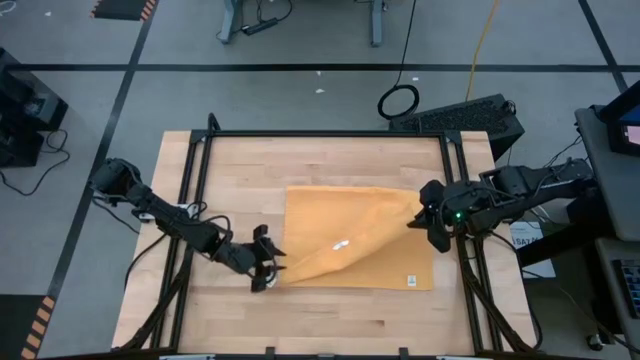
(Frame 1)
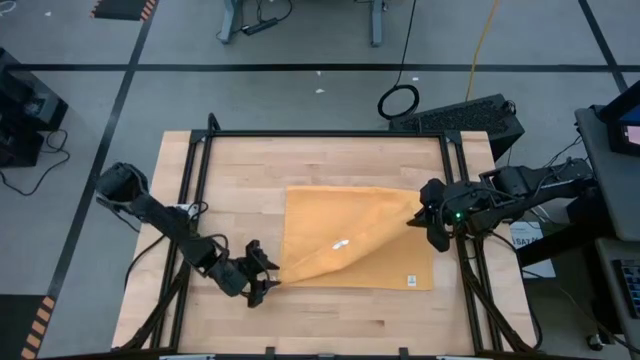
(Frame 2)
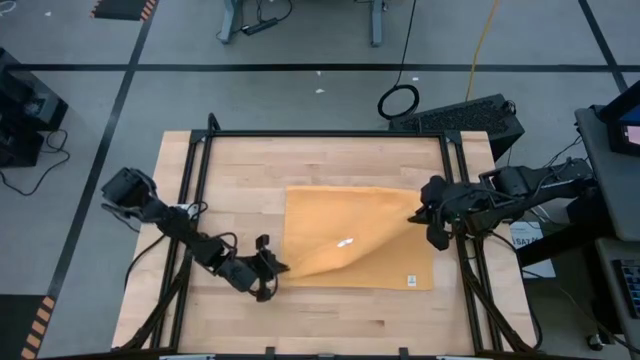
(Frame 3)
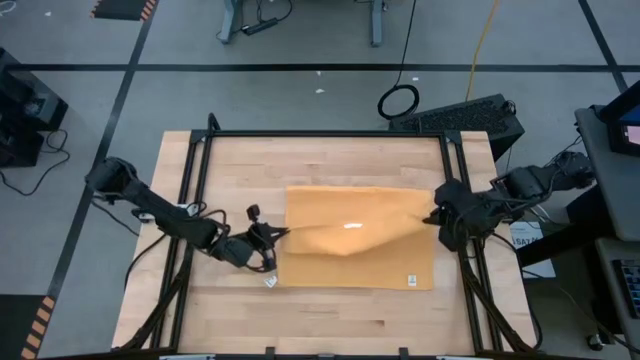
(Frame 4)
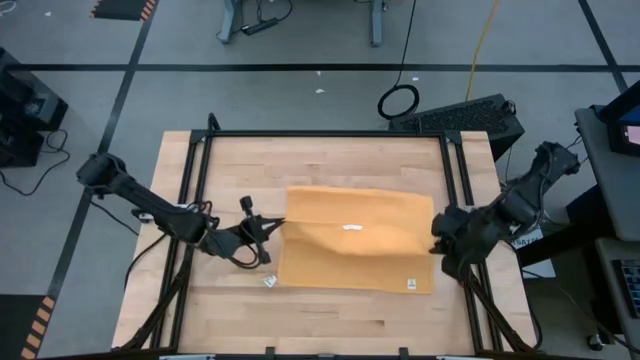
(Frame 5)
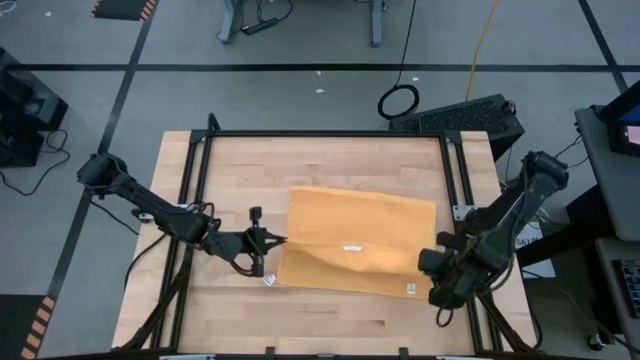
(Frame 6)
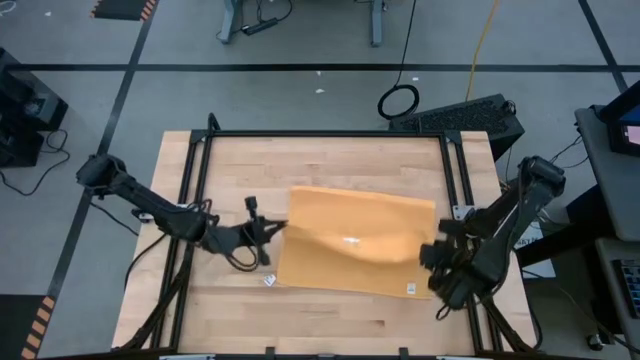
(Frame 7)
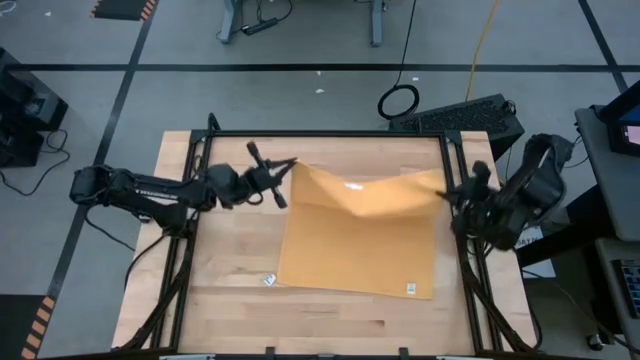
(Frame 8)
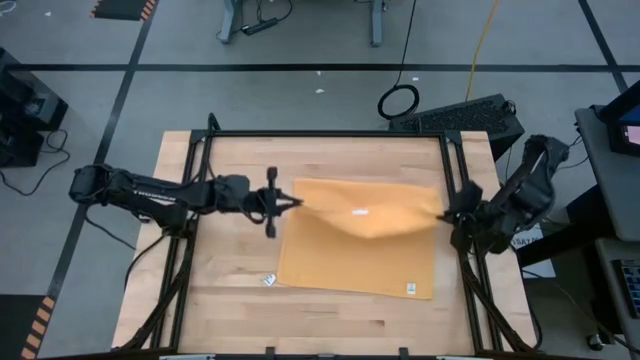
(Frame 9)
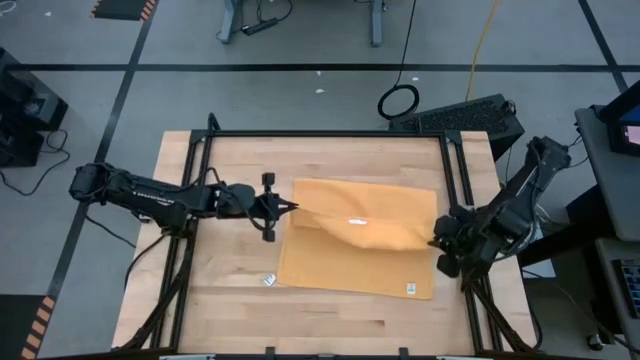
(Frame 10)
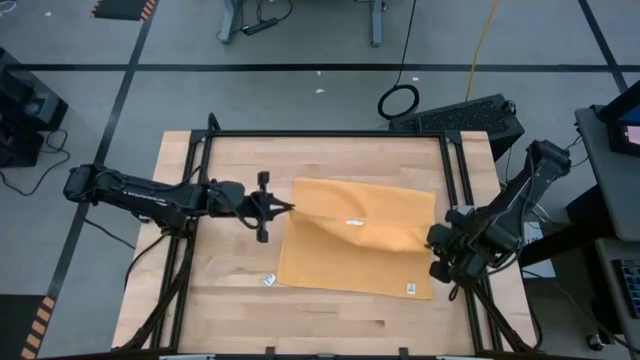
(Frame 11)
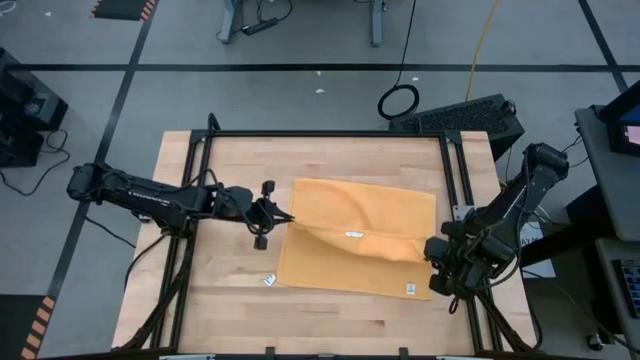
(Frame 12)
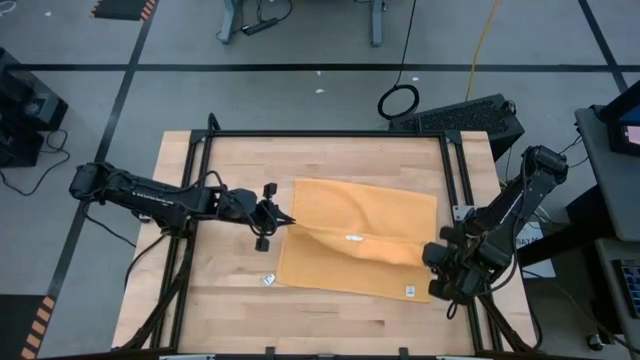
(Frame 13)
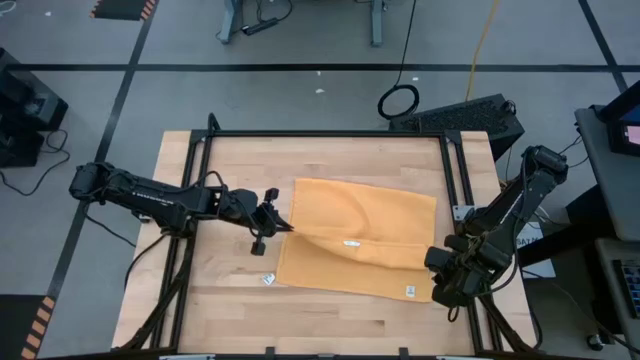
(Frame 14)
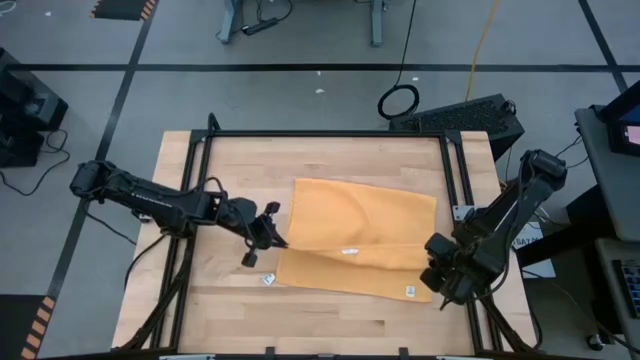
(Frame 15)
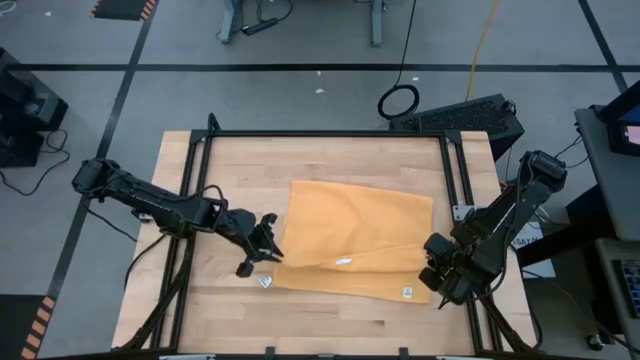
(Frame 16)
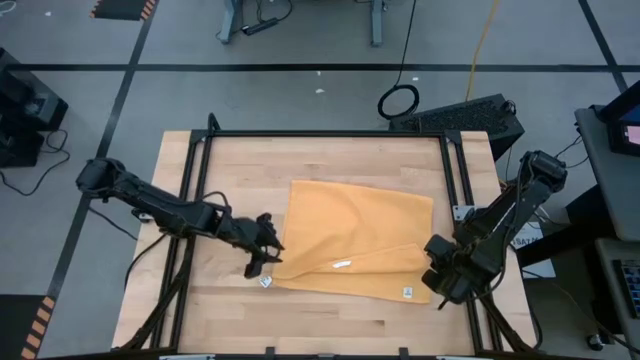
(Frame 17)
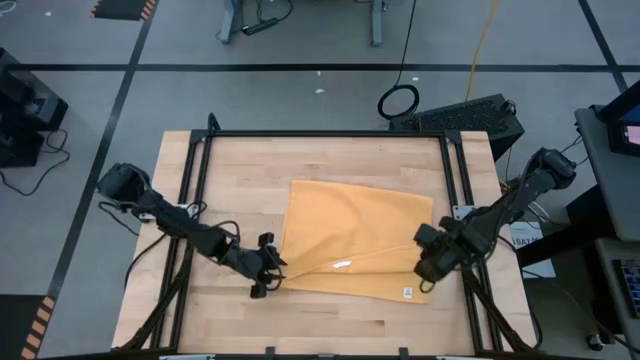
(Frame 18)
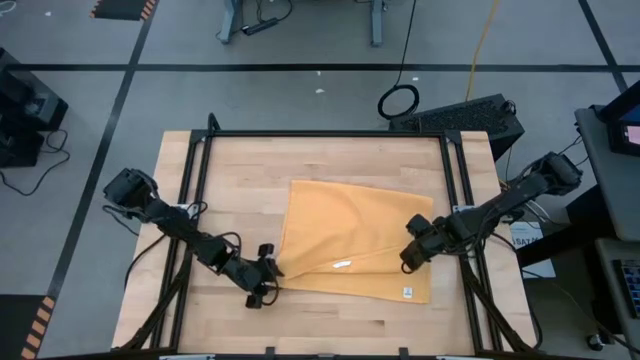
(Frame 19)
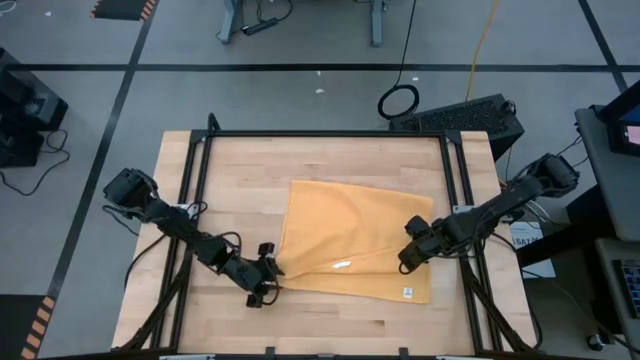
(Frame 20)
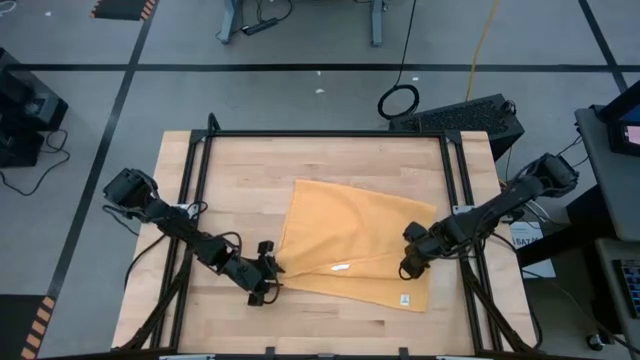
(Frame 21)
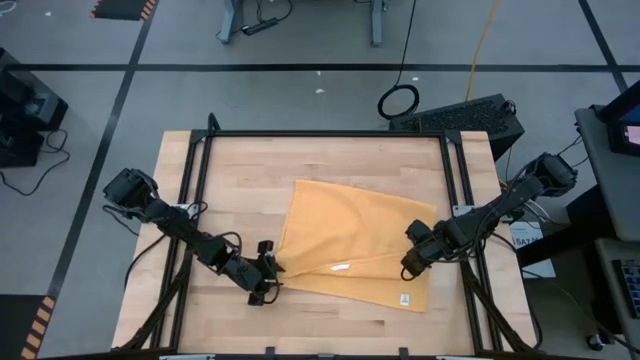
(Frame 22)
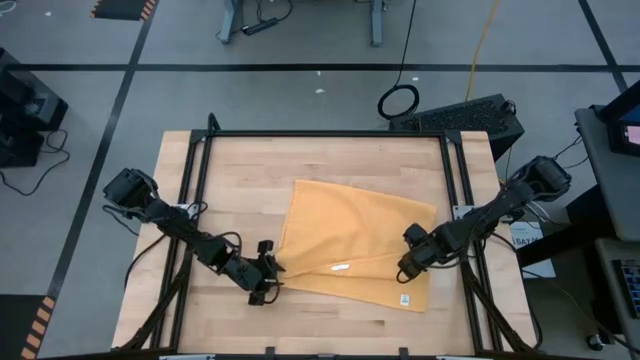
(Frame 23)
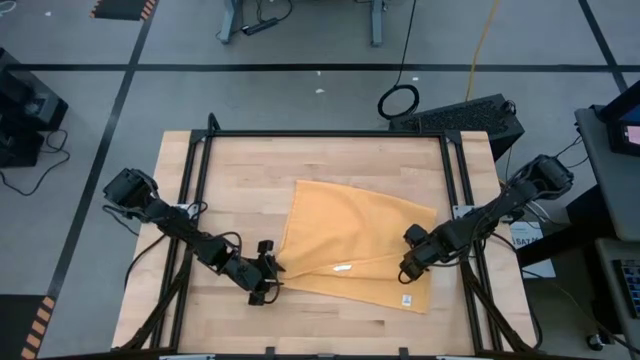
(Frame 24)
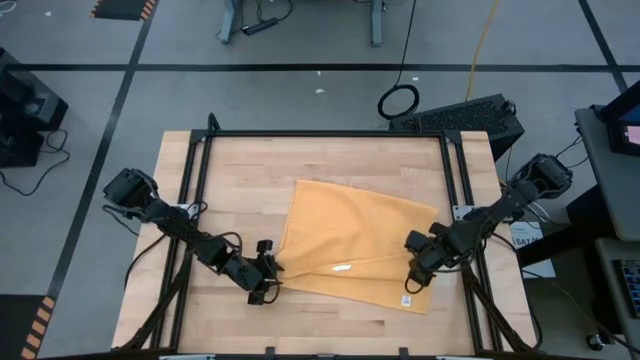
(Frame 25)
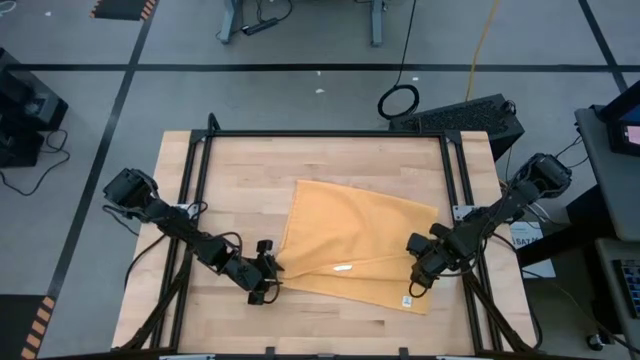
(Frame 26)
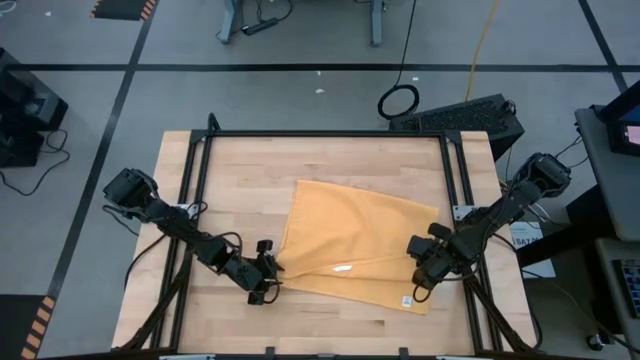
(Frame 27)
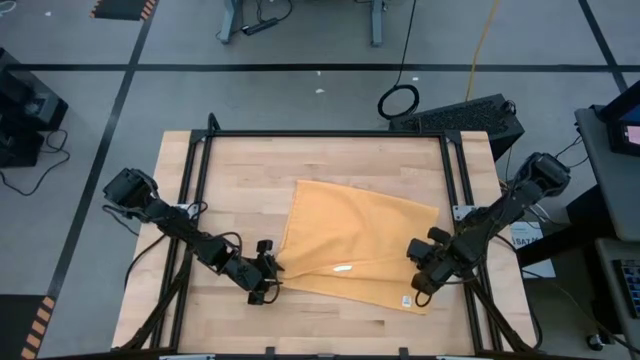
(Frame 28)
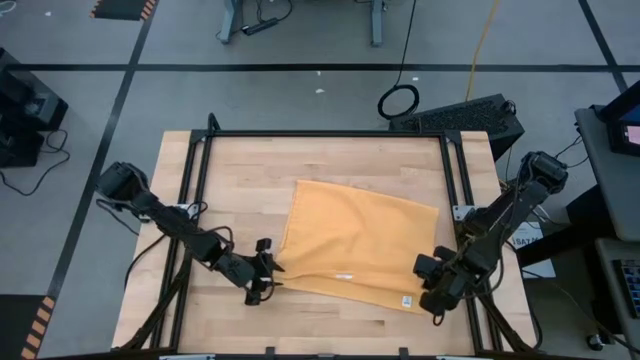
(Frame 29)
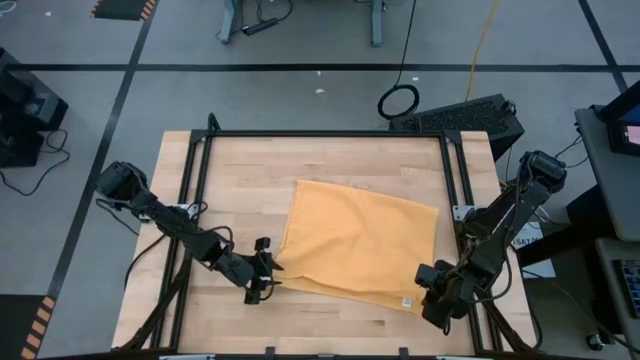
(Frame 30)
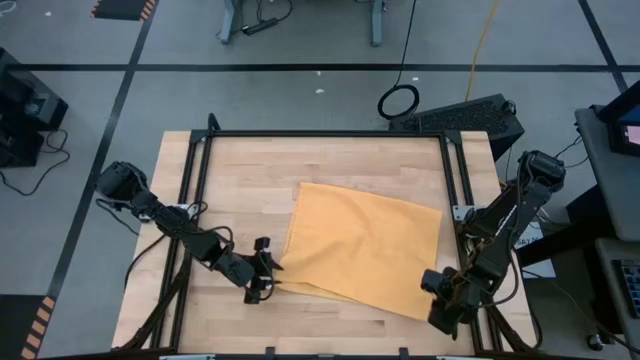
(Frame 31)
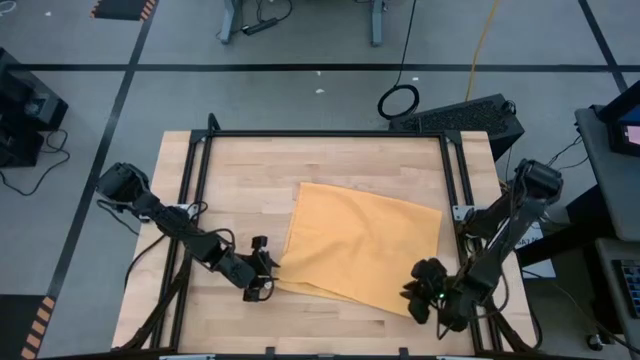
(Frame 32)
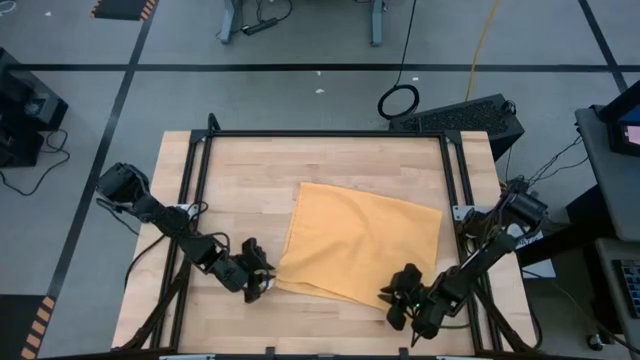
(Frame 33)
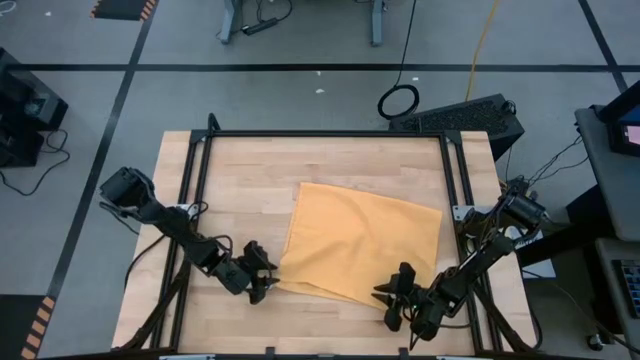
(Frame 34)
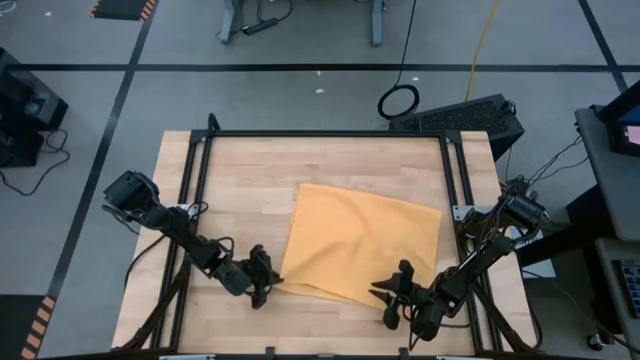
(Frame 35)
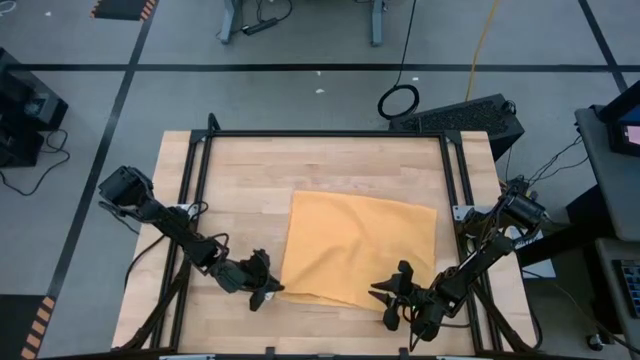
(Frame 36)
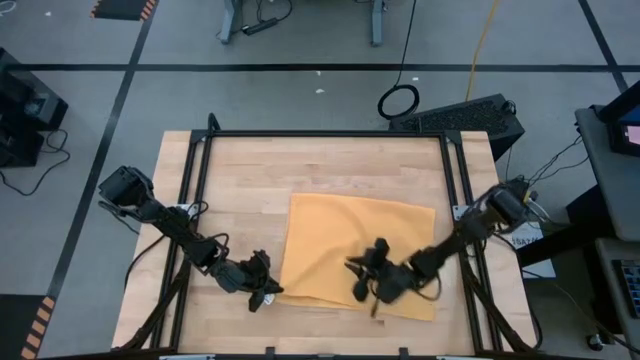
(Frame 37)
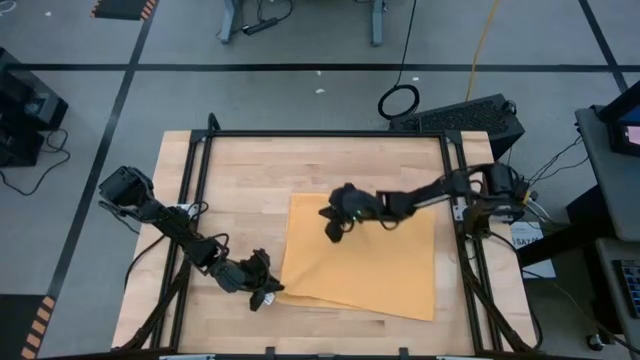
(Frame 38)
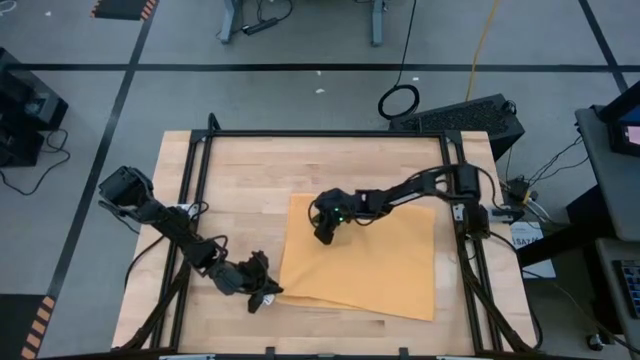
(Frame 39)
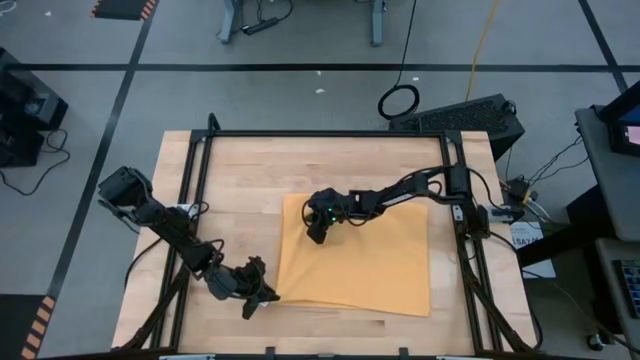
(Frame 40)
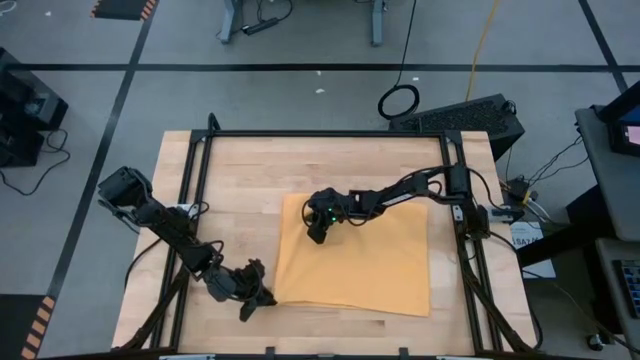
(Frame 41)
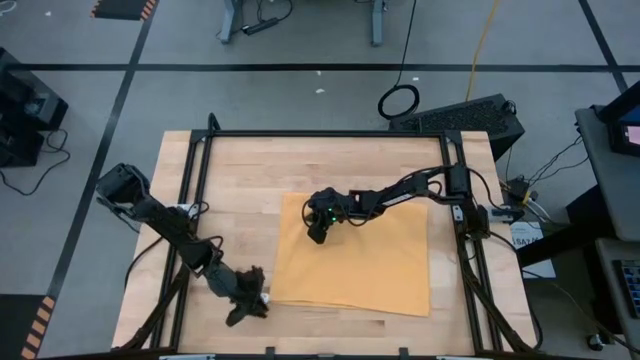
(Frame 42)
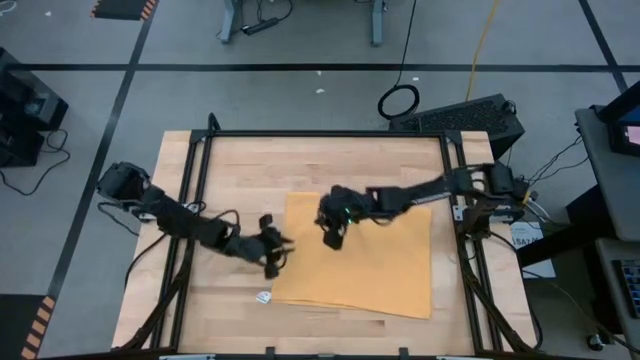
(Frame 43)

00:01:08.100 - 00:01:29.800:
Task: Roll towel
Fold the yellow towel in
